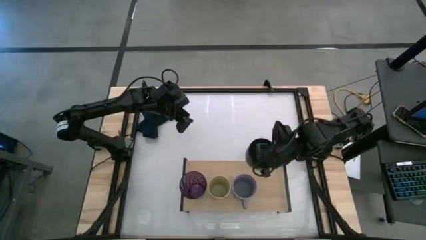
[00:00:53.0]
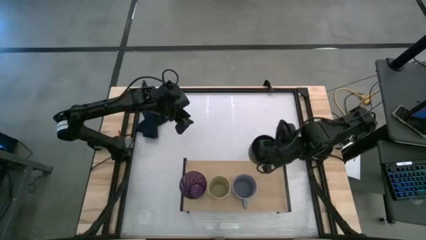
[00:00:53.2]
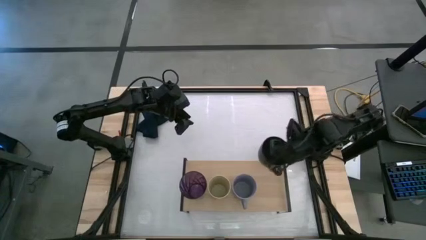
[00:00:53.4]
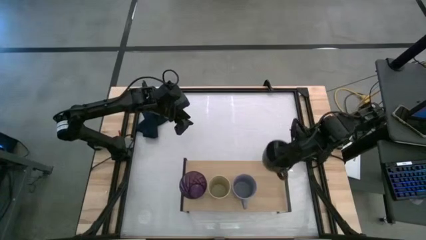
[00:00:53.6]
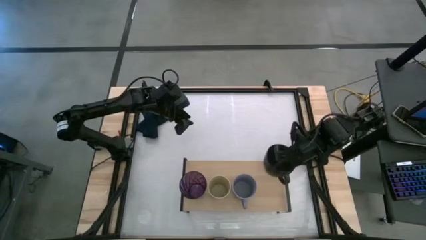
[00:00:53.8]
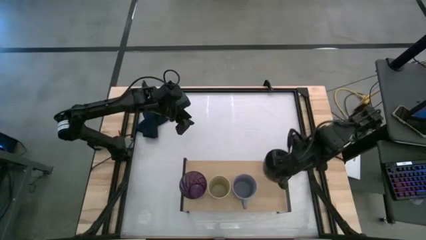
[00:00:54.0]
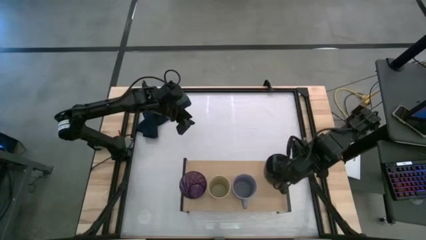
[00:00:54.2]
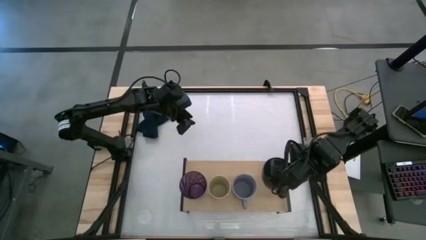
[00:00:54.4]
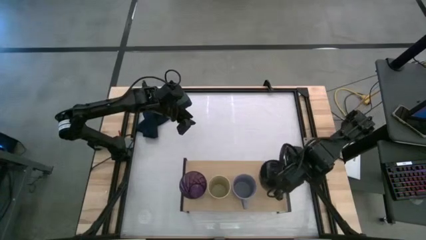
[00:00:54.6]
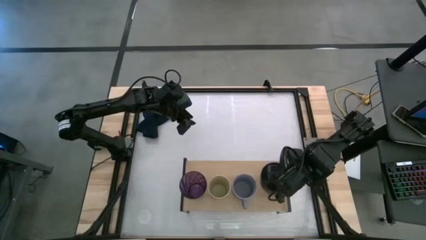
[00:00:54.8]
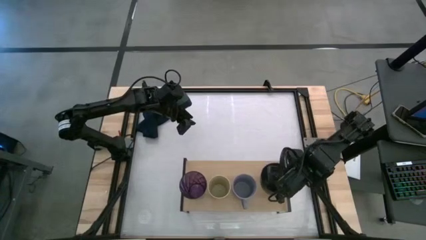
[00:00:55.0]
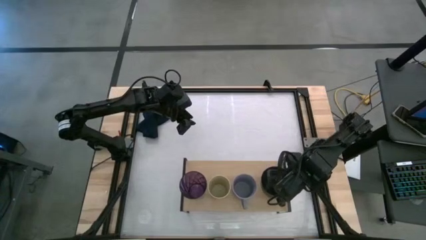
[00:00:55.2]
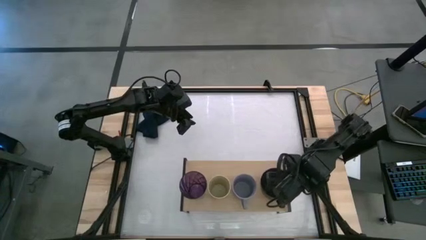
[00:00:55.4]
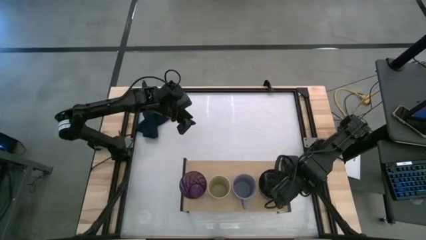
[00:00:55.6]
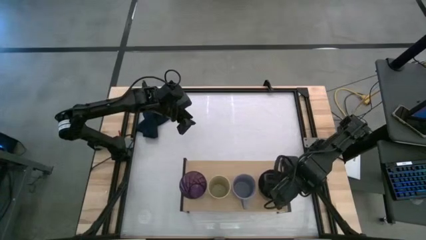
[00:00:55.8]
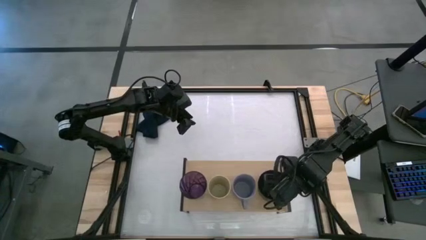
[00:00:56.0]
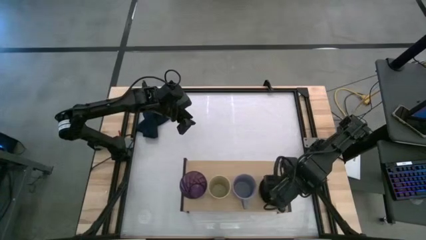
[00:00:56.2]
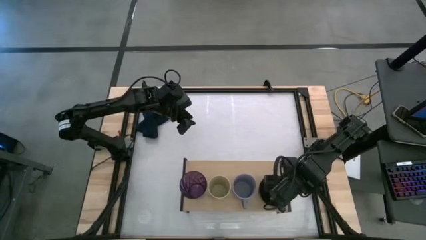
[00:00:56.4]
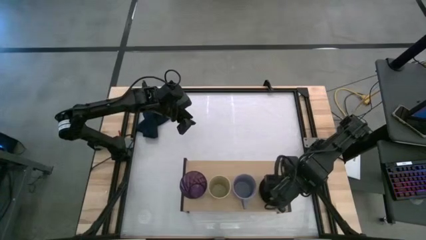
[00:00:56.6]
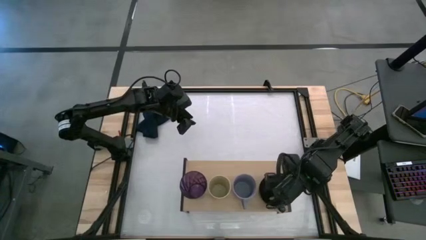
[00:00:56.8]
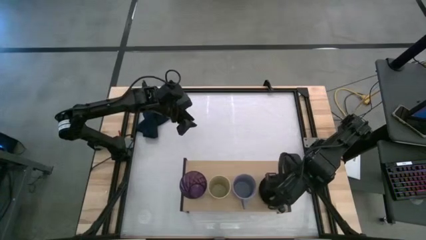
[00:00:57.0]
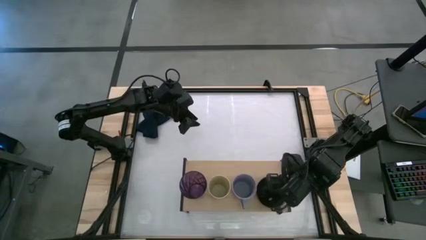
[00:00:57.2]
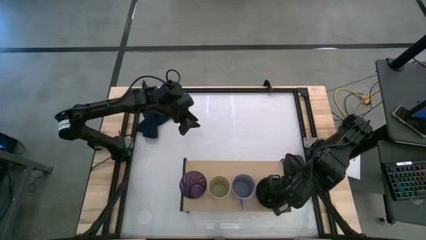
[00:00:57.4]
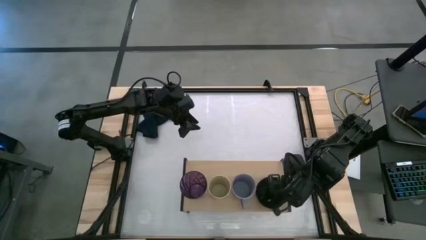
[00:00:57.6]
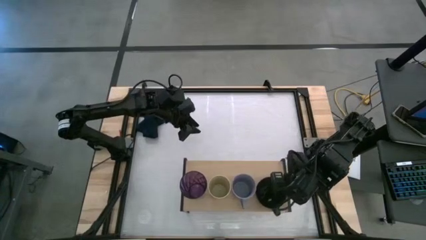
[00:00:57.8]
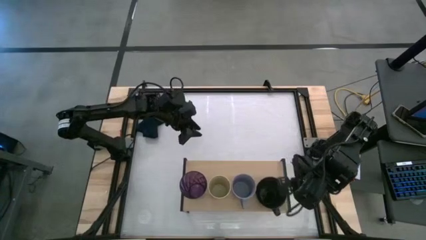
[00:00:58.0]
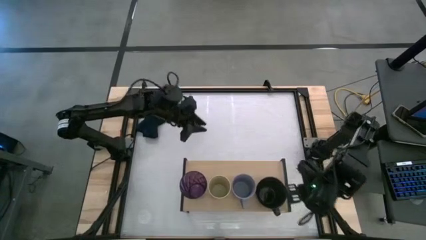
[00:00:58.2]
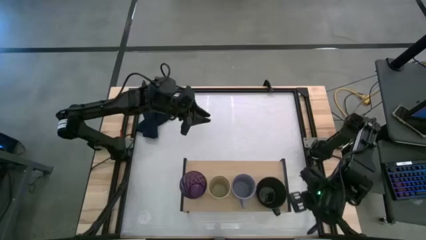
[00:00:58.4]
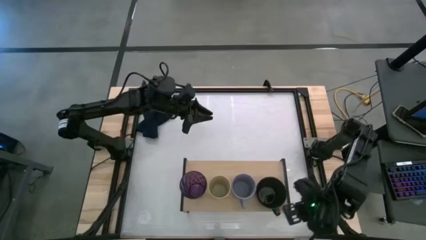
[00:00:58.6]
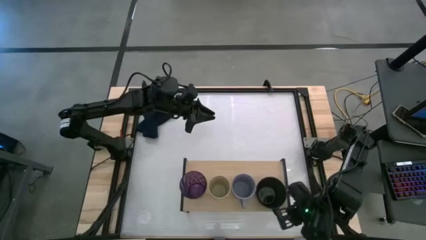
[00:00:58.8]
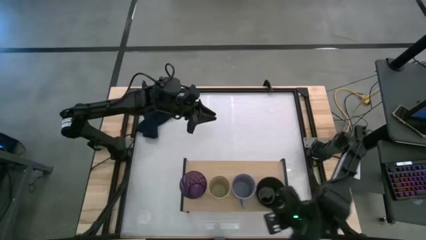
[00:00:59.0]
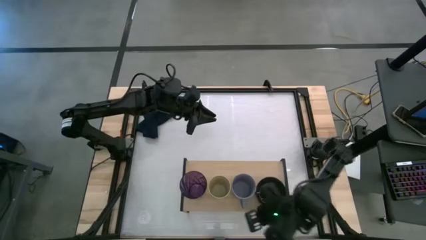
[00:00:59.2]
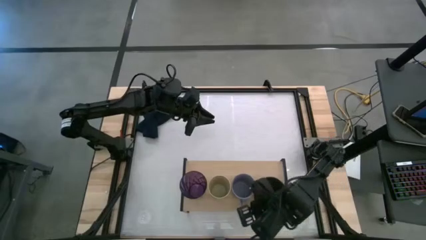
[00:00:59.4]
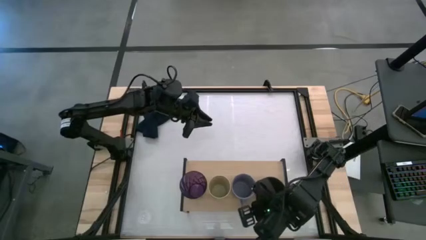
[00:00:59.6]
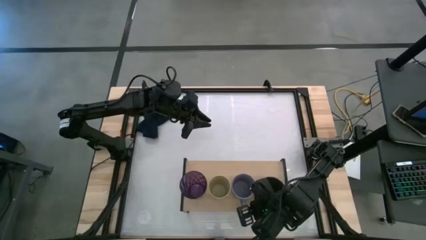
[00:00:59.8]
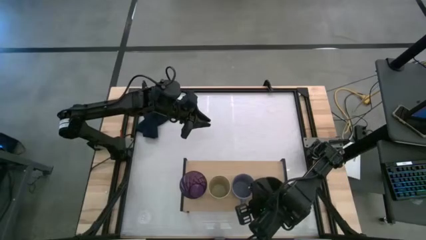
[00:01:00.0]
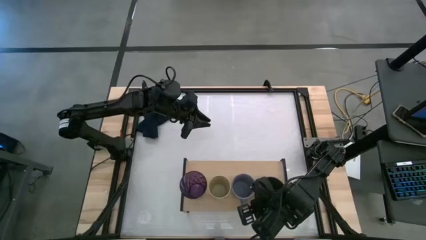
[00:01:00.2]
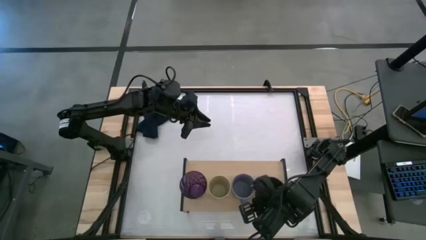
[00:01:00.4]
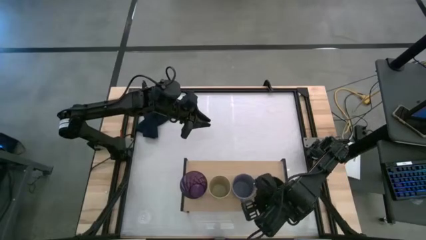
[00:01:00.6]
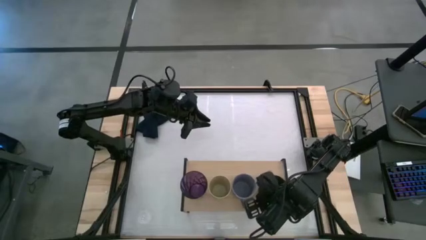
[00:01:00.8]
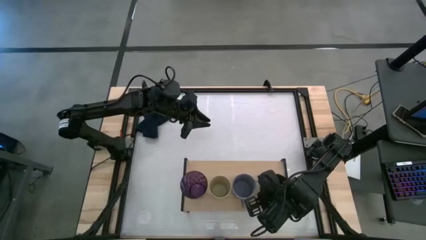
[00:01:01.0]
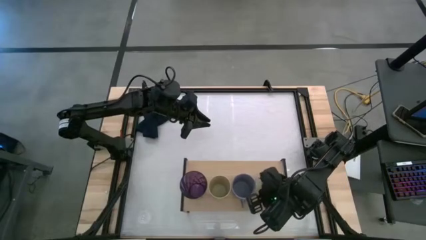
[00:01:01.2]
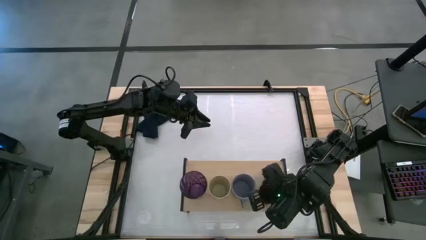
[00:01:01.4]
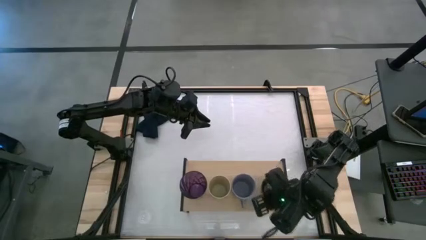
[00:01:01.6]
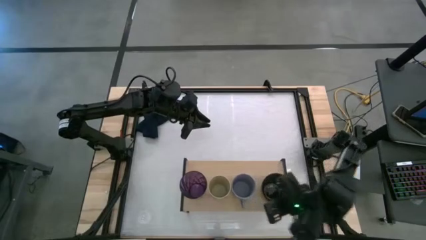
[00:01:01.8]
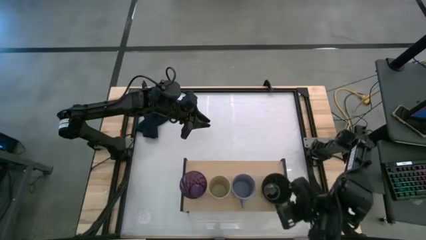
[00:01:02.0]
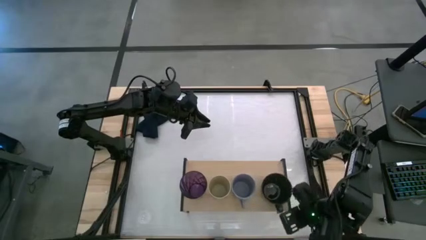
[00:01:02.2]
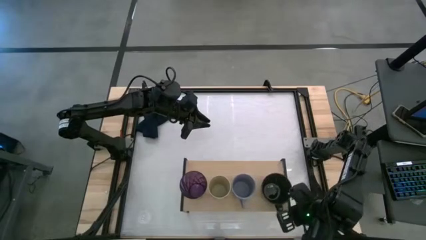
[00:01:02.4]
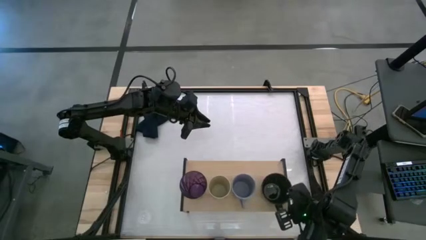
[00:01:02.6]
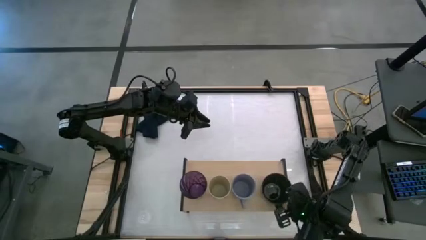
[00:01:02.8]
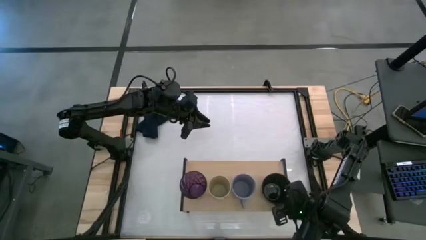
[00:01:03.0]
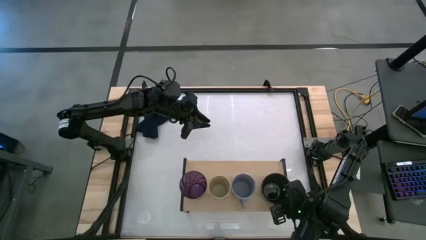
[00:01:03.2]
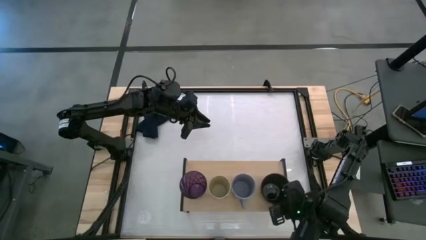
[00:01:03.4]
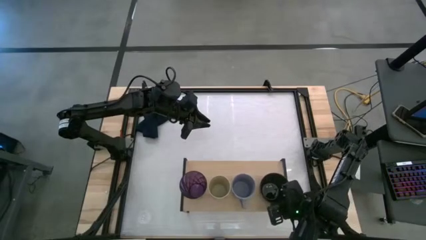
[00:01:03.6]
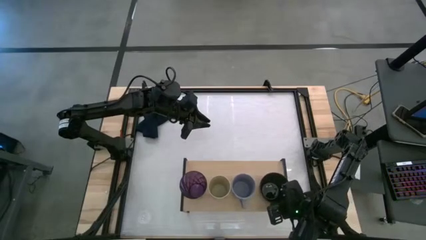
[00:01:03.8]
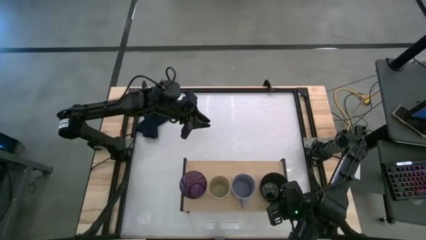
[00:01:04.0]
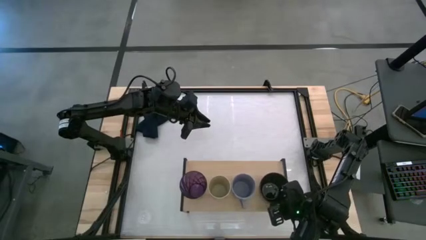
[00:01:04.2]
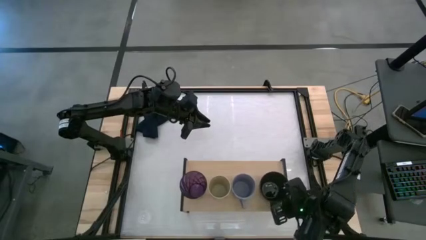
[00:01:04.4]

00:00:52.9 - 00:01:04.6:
Task: Stack small to large cups/mugs on shelf
Put the black mug on the shelf
